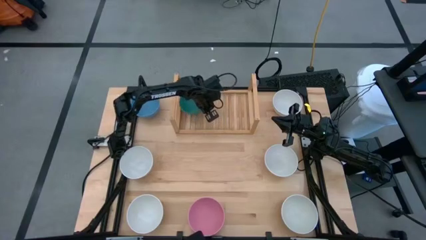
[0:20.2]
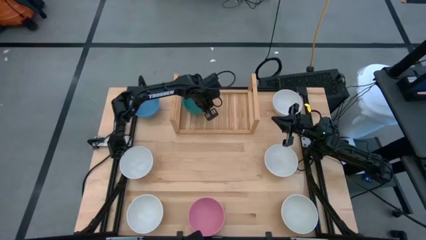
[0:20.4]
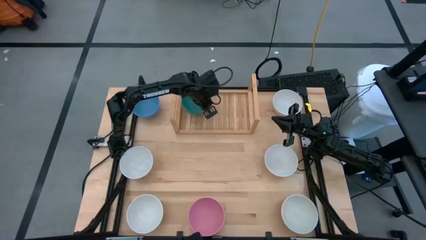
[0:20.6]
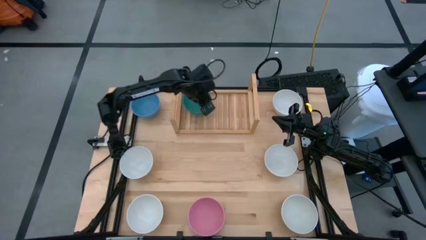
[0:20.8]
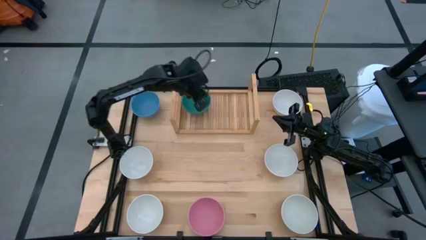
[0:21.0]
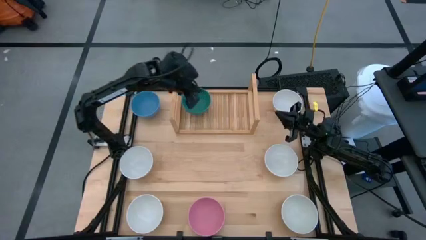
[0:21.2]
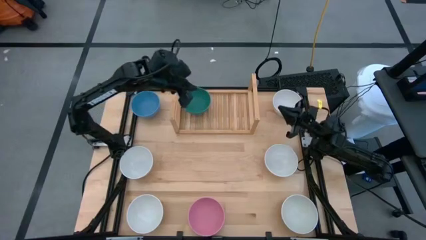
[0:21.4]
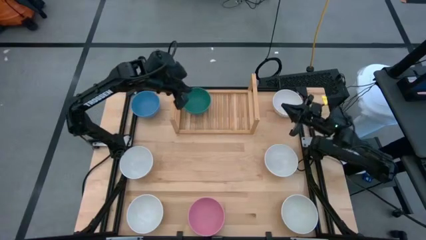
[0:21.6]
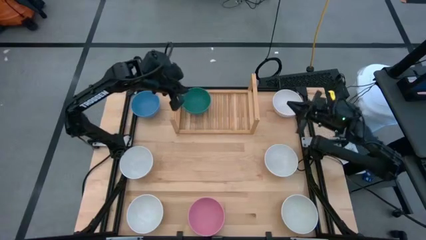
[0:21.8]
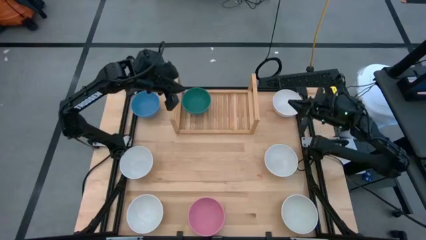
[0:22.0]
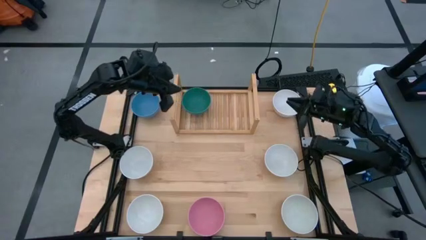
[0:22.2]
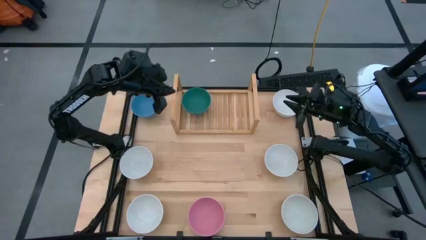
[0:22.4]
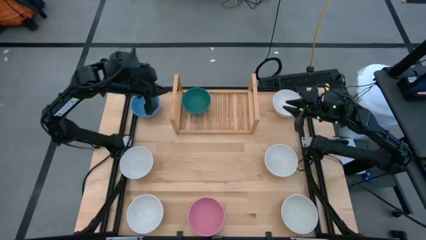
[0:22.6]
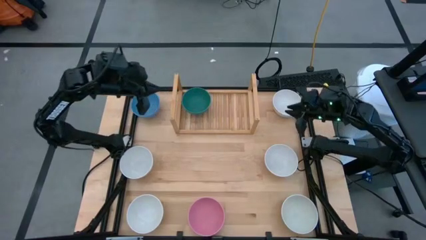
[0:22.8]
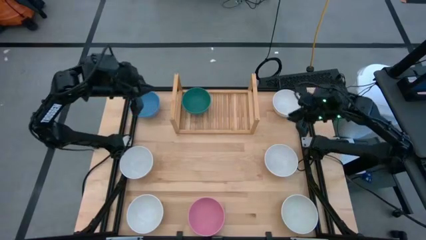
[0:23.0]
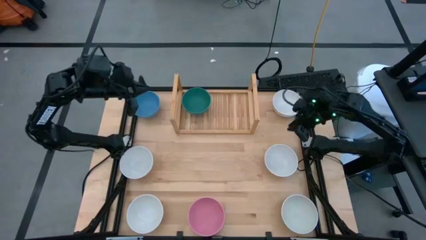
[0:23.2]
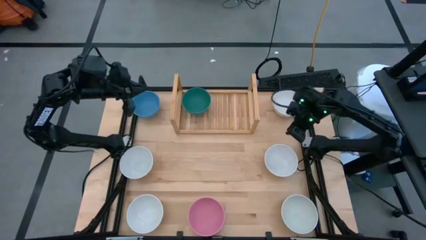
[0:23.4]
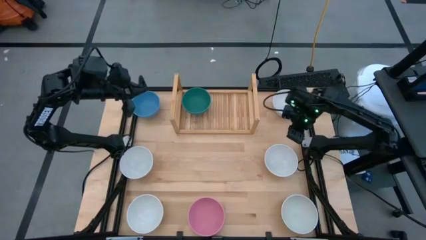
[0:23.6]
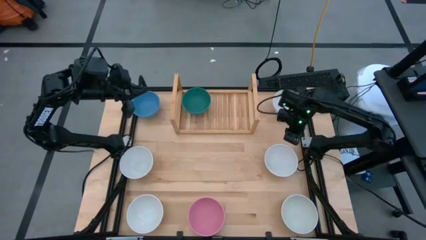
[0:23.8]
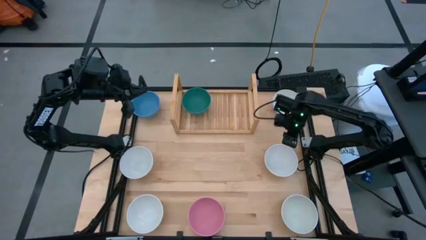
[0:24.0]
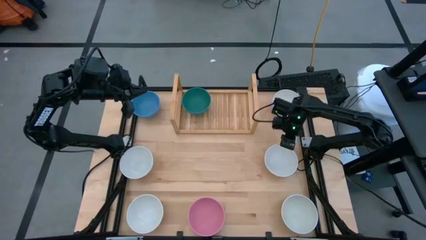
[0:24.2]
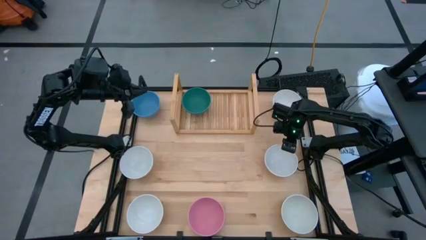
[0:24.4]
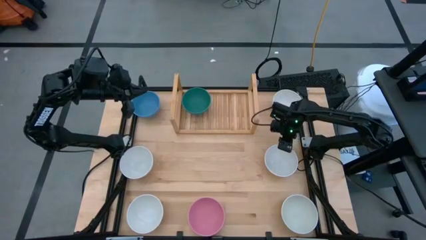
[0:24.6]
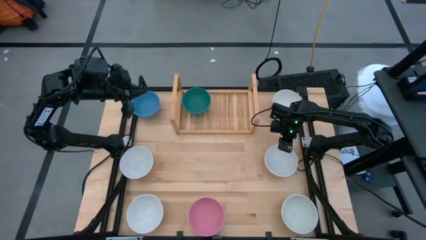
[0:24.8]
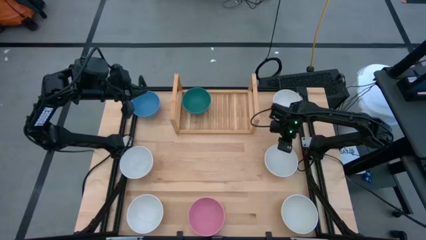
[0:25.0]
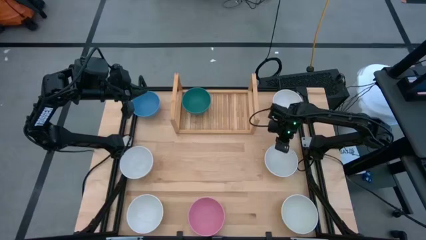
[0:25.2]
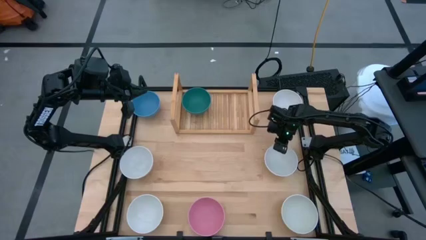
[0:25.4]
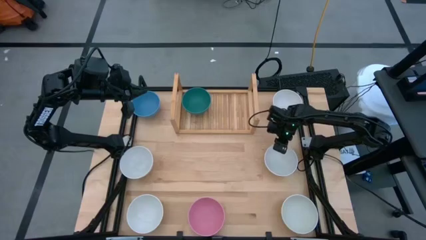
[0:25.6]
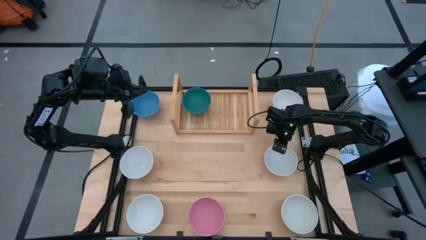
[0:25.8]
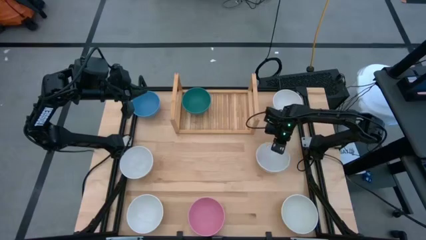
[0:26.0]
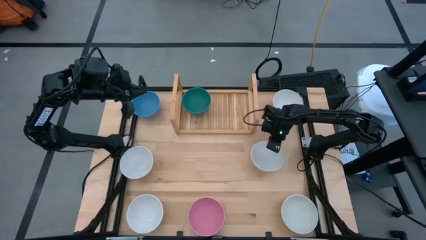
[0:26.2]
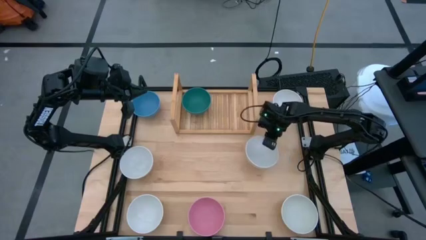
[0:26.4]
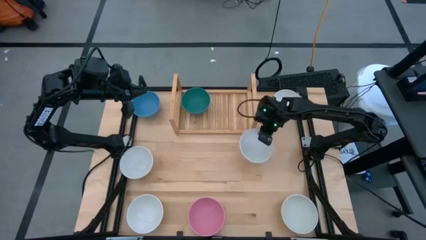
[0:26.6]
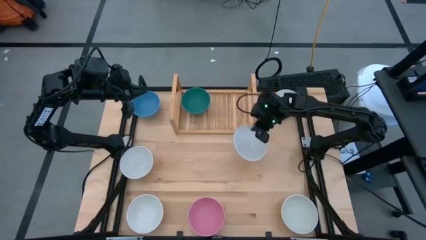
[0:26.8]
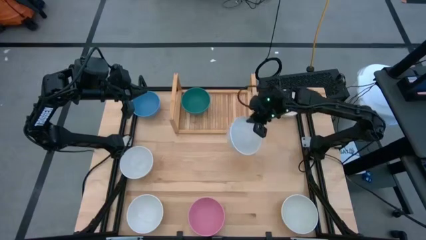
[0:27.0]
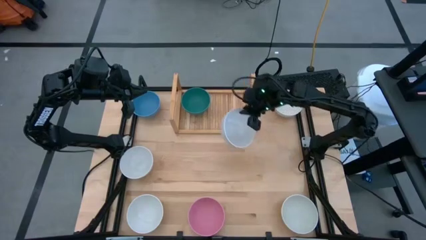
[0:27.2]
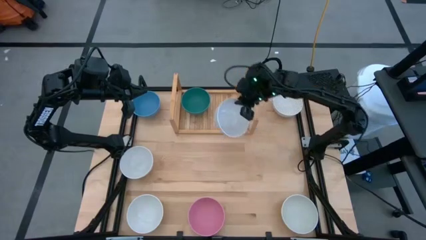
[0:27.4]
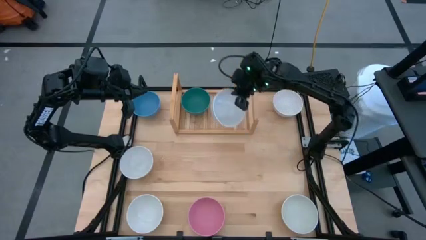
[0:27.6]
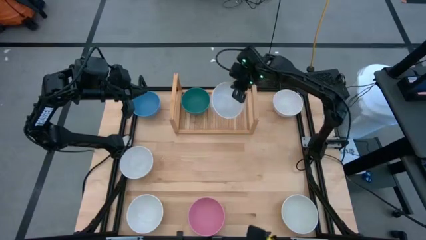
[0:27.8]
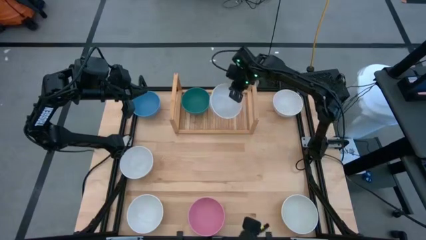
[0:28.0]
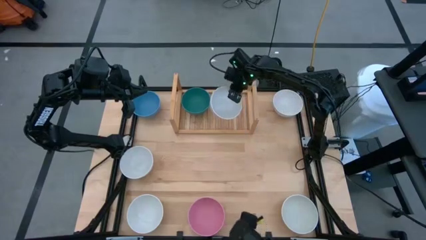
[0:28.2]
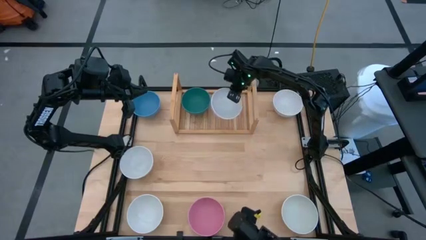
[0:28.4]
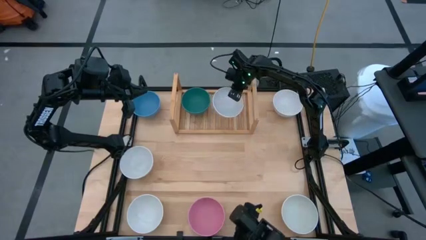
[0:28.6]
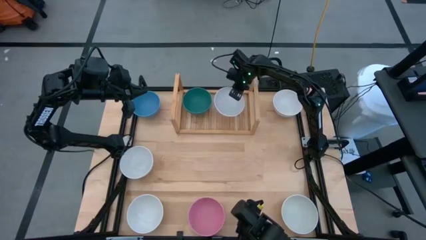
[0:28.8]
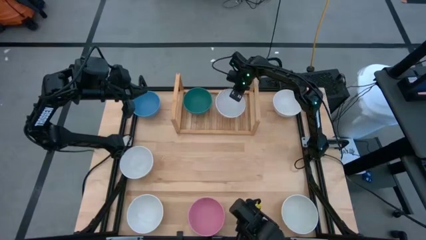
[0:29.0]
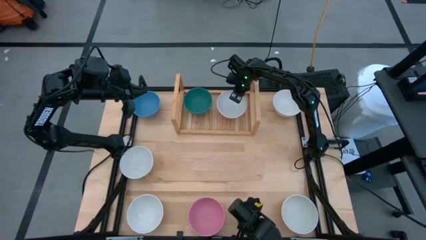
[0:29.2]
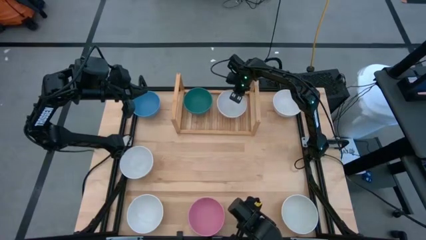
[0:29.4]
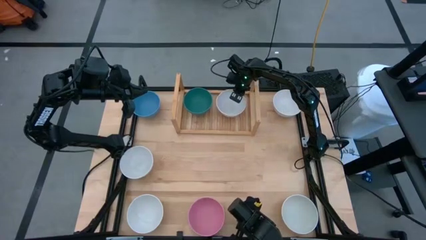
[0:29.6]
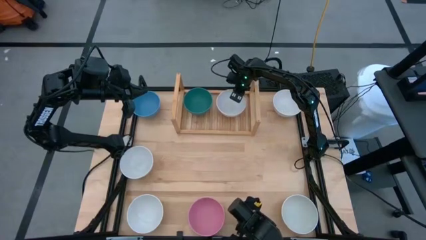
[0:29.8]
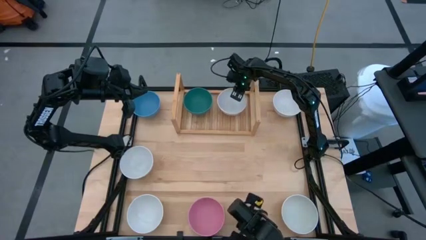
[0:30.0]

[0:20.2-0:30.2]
Task: Place and stack bowls onto a shelf
Put the middle right white bowl on the shelf
